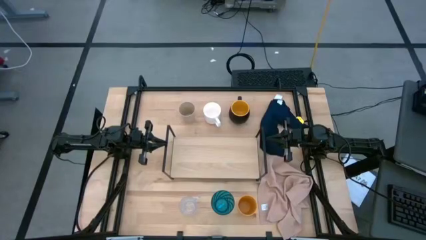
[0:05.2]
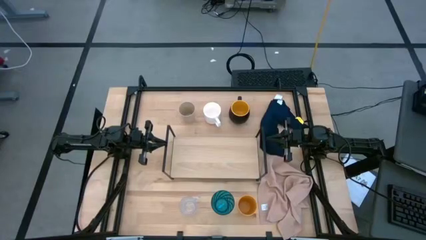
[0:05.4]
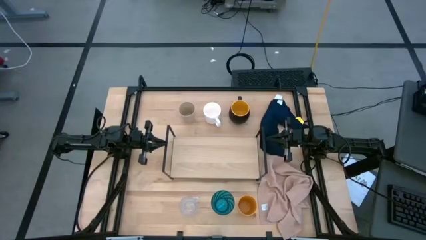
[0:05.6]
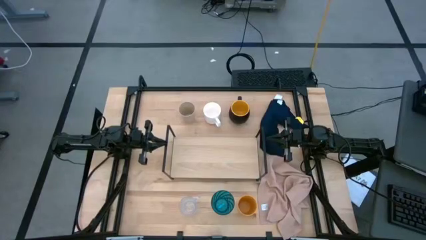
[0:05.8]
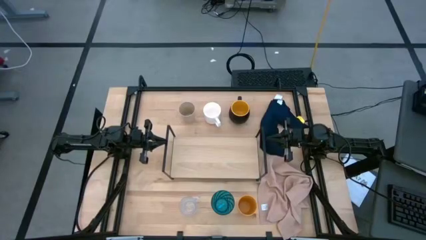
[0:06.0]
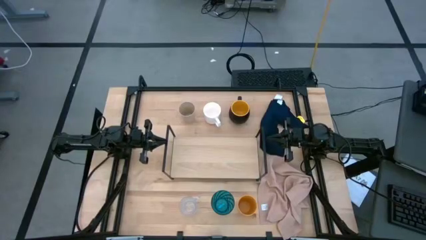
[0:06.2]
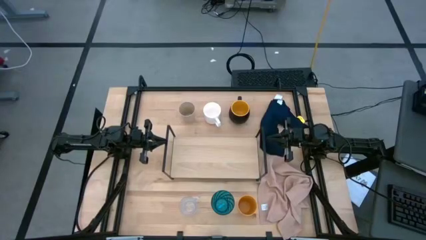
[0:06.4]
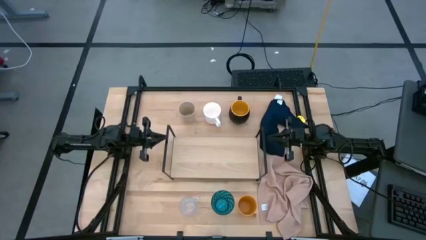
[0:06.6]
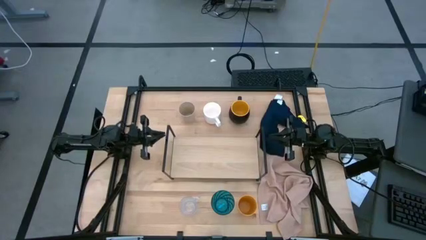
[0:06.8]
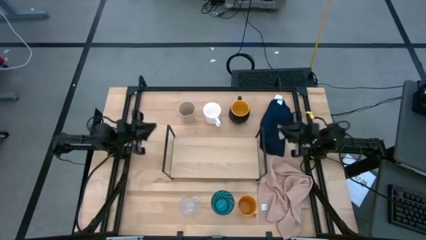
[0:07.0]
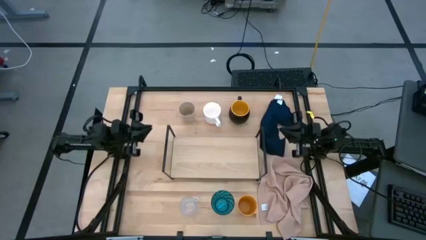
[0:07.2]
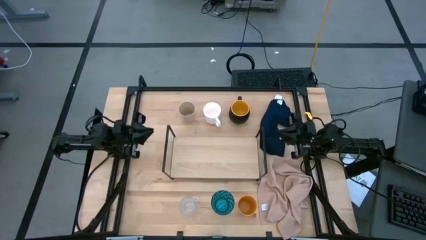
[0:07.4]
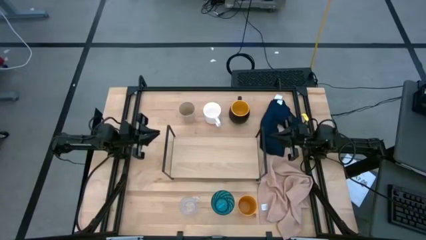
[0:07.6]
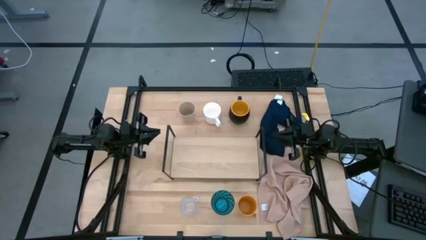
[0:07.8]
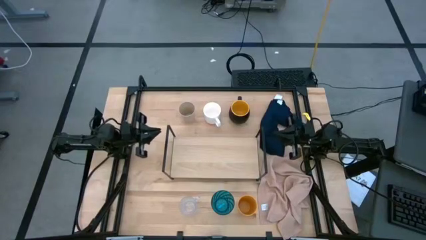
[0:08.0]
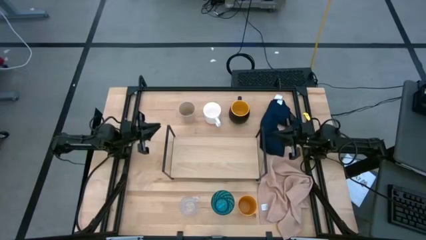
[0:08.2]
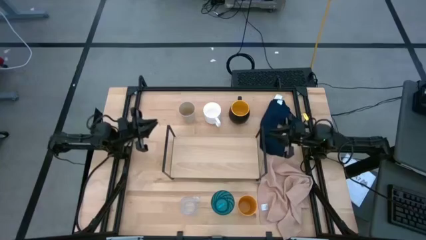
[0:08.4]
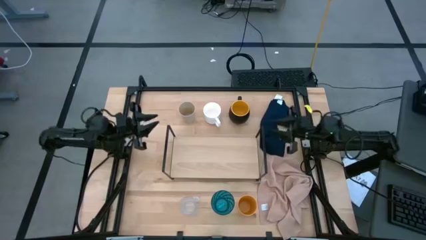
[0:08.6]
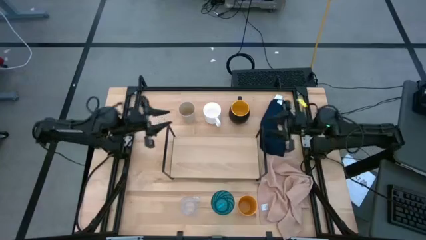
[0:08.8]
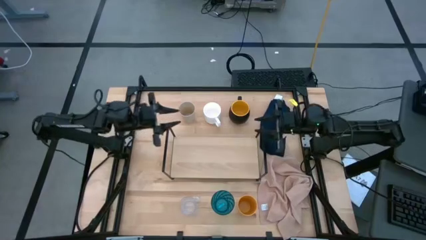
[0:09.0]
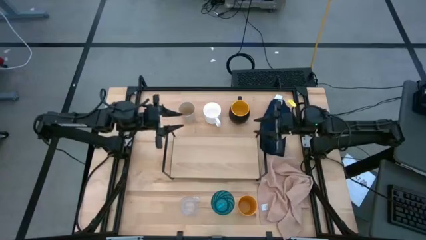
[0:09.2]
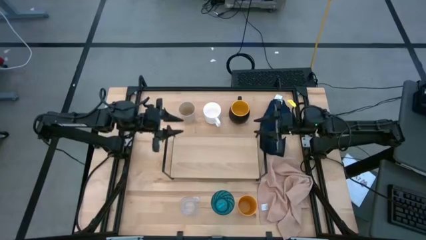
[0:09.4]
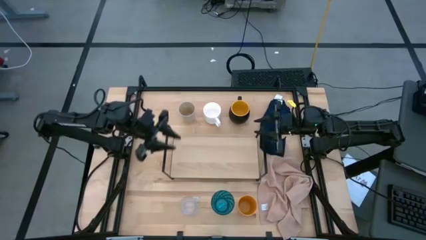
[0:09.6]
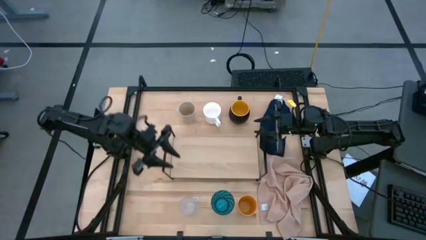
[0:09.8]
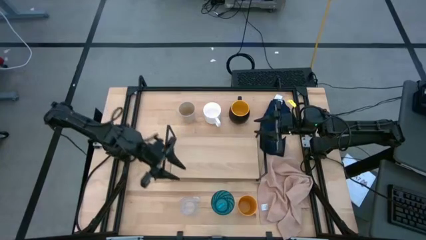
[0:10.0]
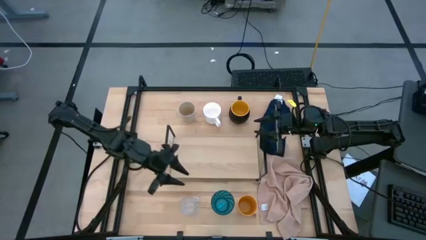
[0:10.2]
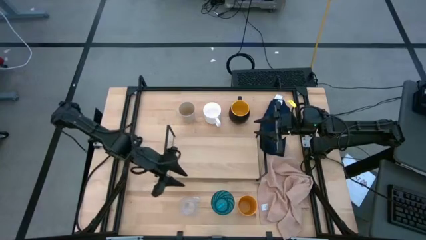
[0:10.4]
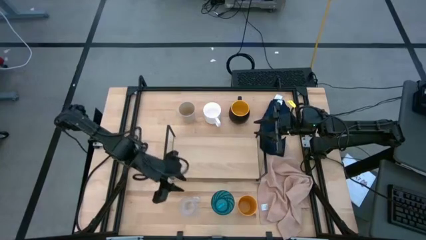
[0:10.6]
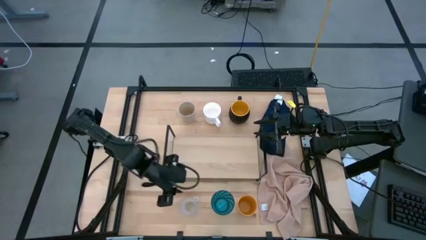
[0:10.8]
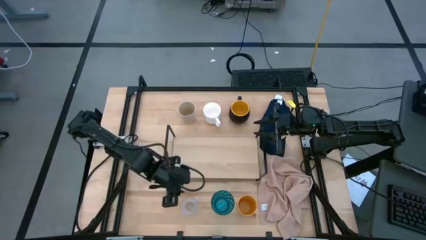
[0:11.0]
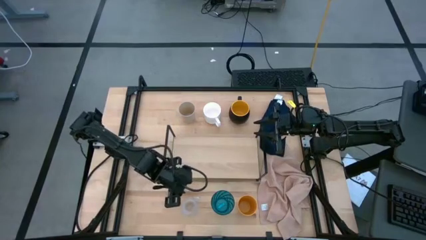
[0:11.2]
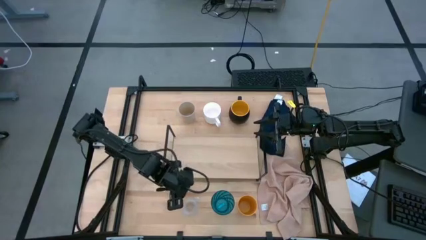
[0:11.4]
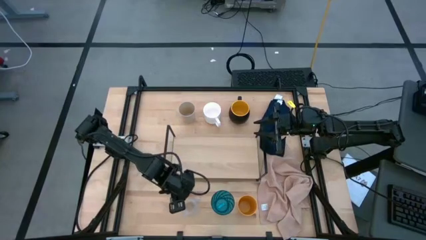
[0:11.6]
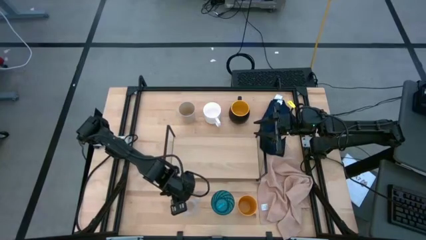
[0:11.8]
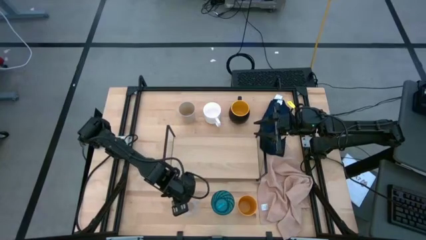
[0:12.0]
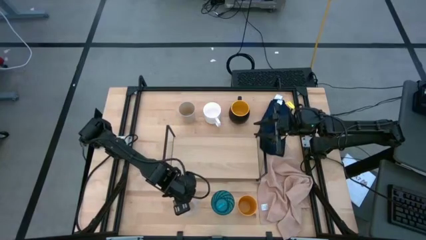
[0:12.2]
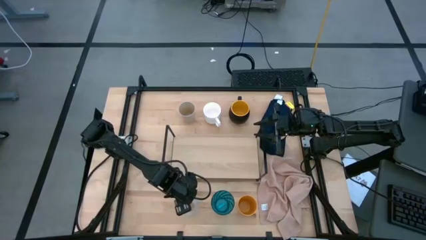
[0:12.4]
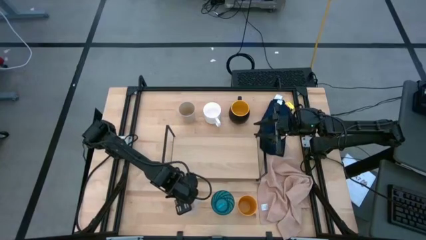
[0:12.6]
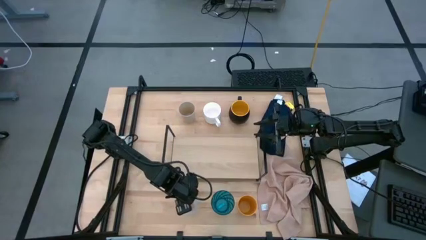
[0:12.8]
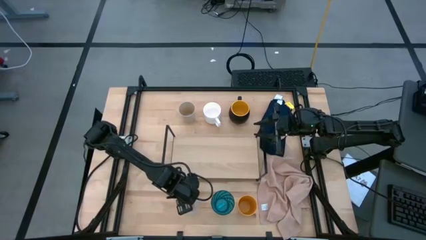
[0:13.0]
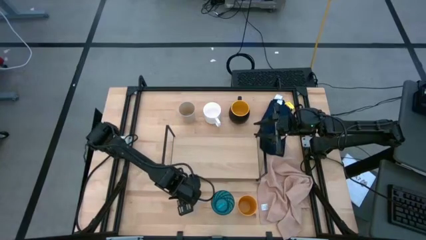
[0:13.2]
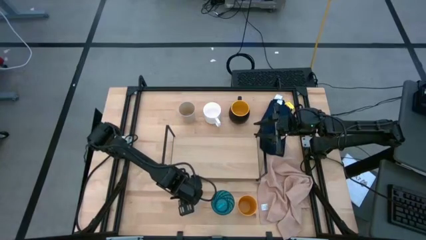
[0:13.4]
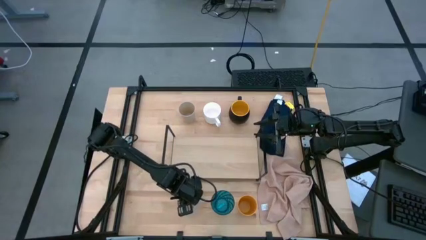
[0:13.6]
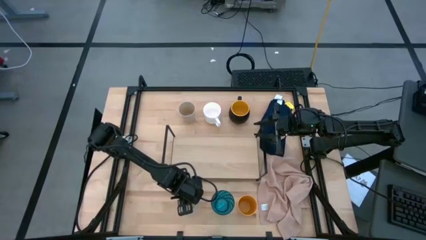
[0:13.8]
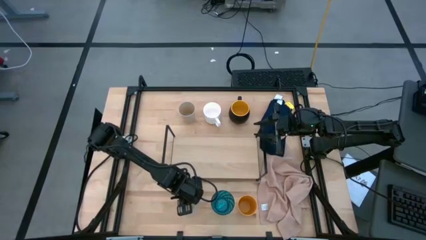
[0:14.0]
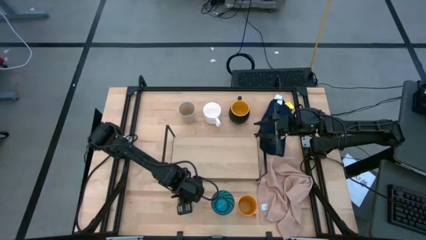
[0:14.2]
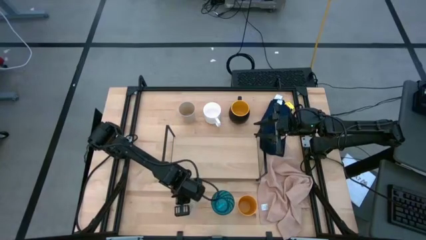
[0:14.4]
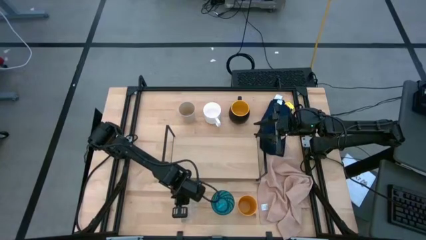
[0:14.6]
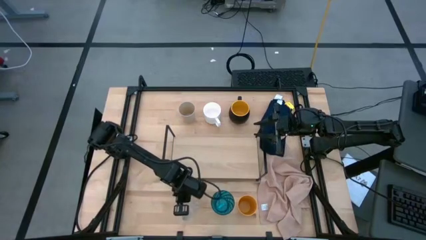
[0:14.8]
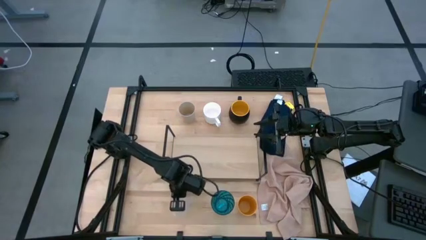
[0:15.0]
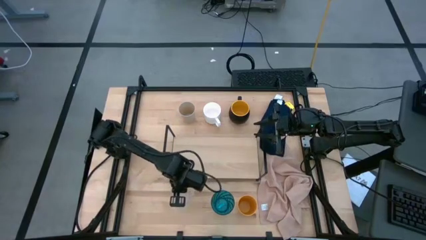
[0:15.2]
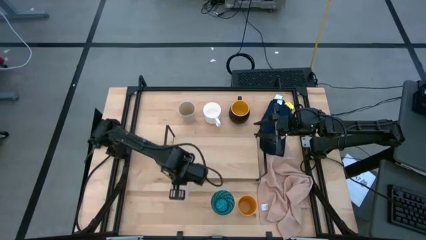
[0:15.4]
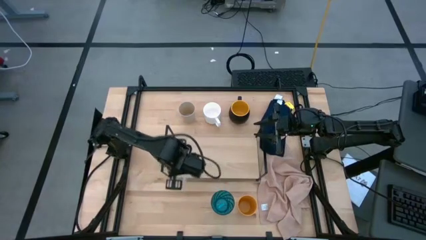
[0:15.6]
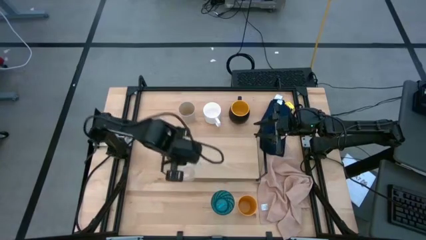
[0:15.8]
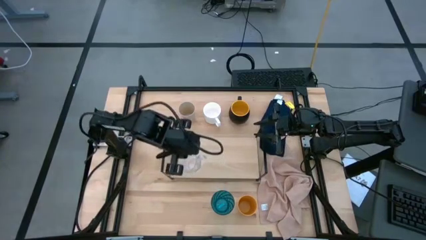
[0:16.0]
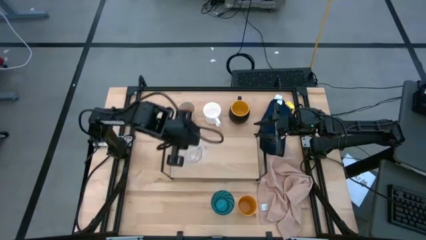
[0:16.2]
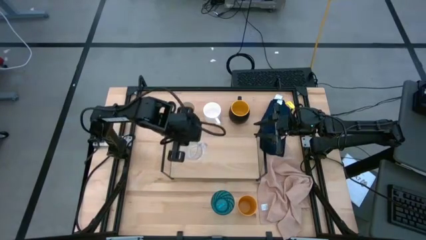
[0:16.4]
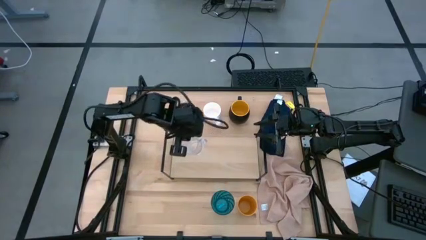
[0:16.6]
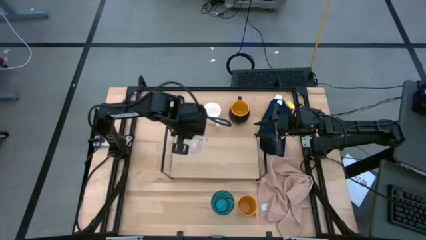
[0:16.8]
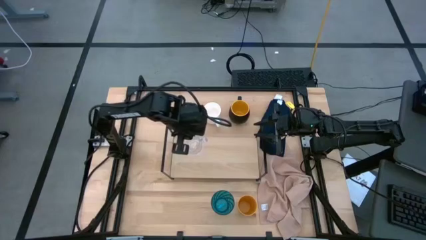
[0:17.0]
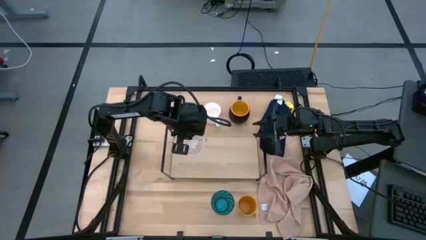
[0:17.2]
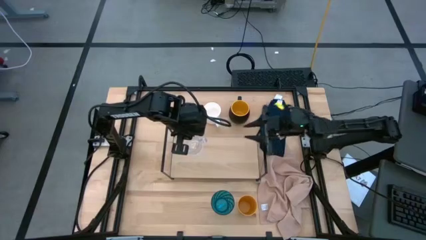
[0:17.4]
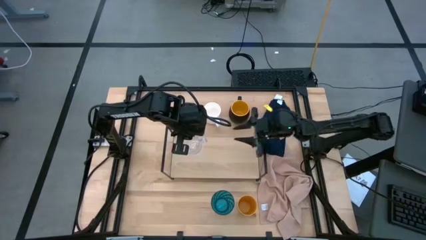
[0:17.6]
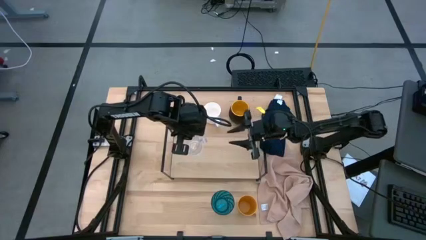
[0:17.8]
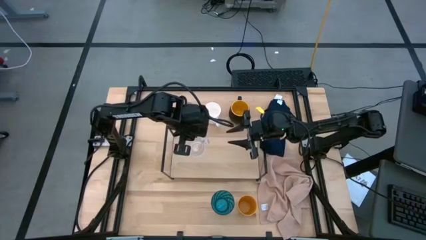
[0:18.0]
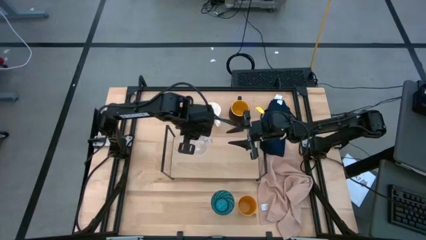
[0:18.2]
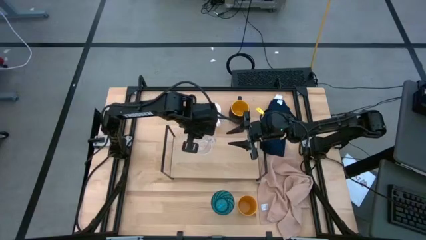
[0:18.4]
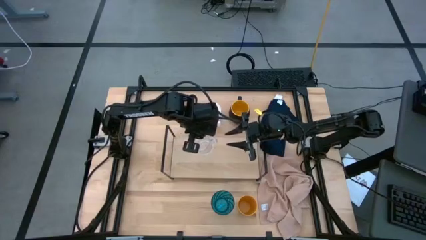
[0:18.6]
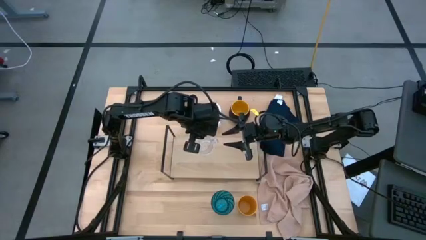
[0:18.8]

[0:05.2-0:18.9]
Task: Stack small to large cups/mugs on shelf
Put the transparent mug on the shelf

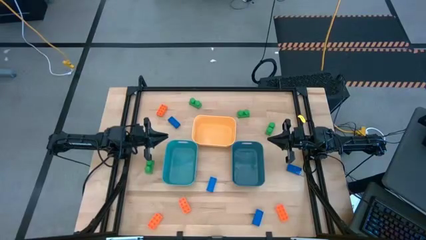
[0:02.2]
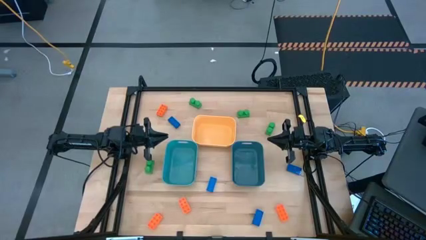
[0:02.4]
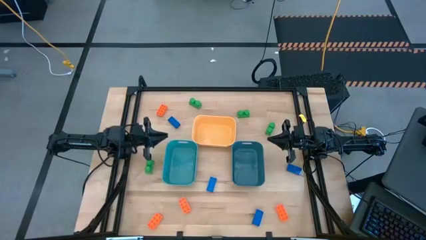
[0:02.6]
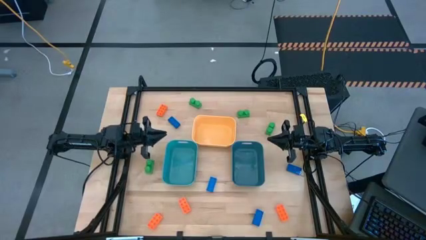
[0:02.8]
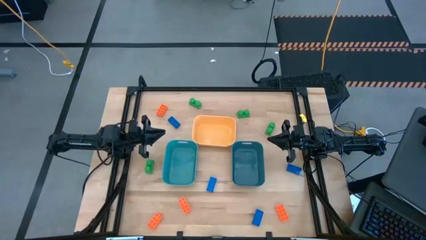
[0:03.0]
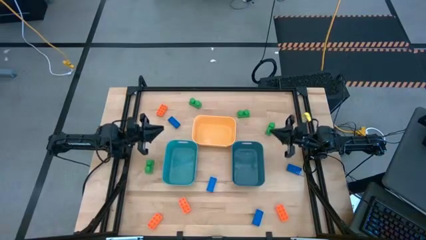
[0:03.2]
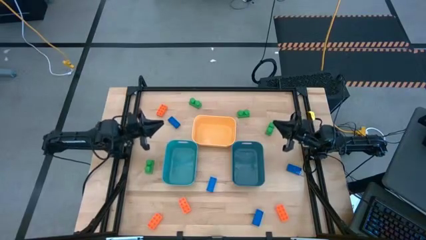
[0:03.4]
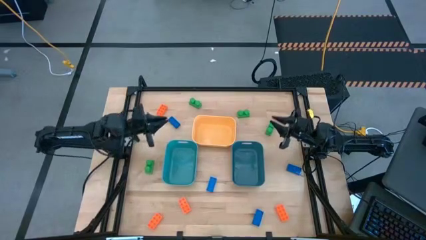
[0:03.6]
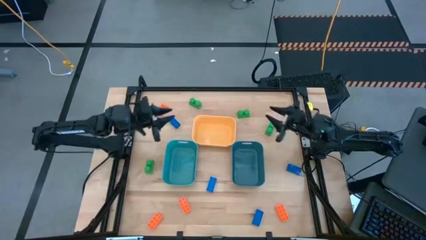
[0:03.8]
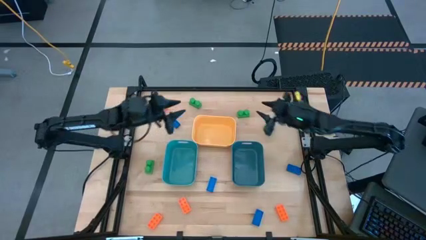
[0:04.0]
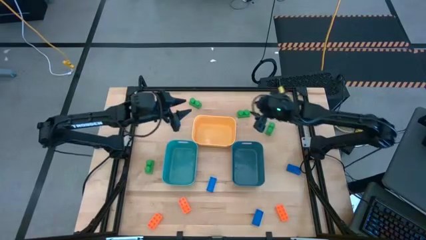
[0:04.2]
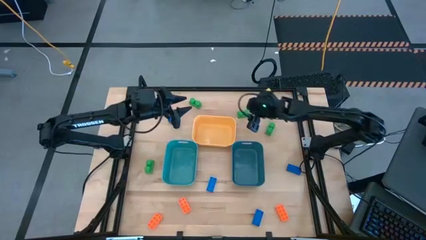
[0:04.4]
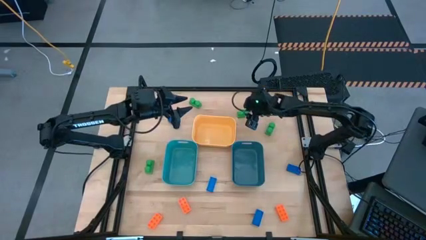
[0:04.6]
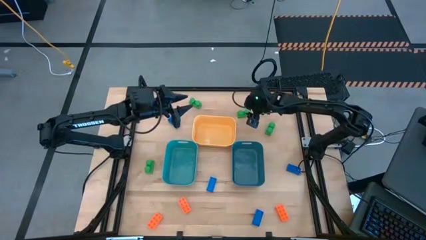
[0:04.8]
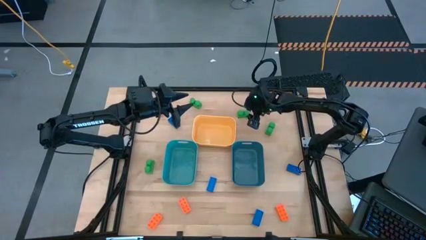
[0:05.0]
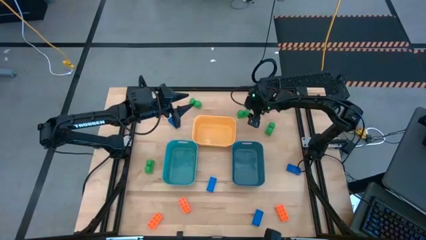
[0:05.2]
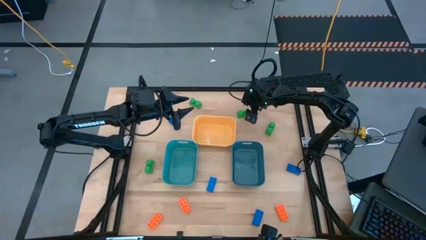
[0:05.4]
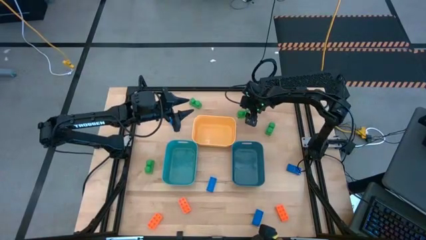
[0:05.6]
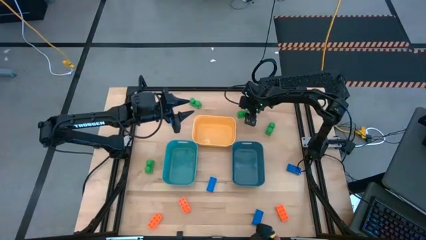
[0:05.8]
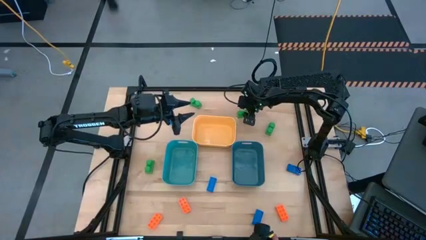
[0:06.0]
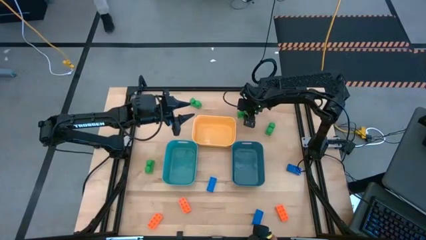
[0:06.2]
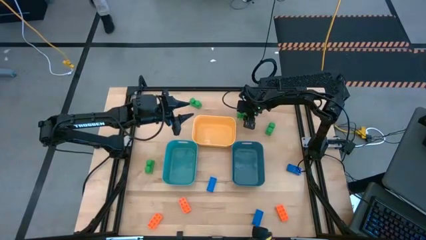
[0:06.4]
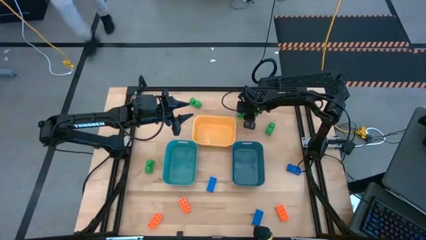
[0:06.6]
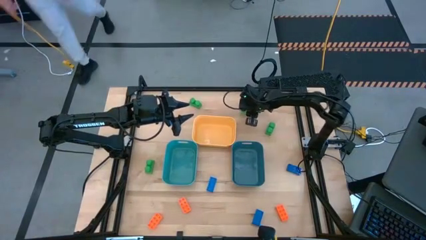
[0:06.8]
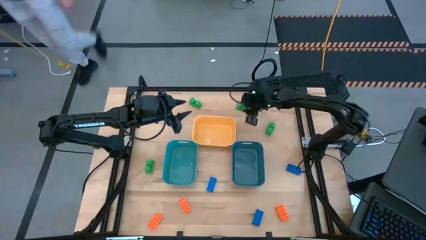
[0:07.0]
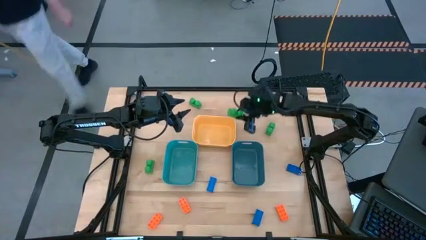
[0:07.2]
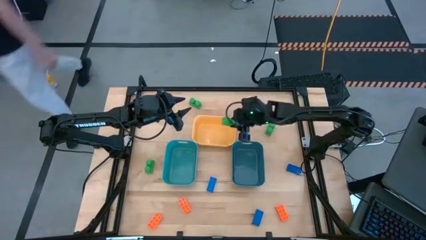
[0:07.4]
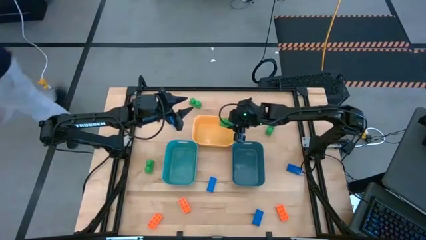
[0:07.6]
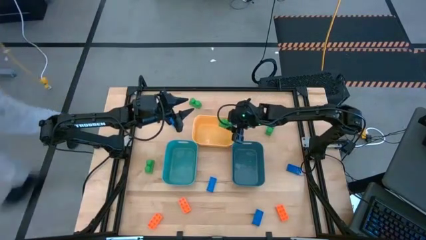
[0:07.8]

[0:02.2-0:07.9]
Task: Sort & place blocks by color
Put the green game piece into the yellow bin
